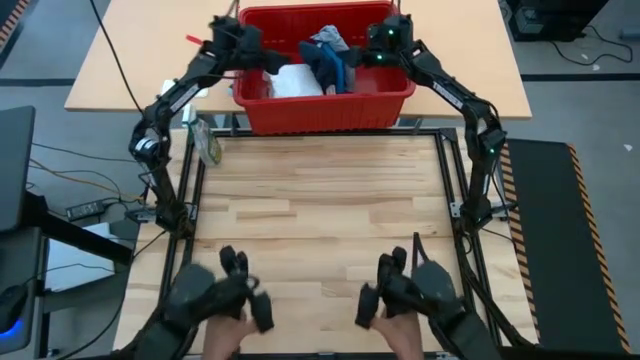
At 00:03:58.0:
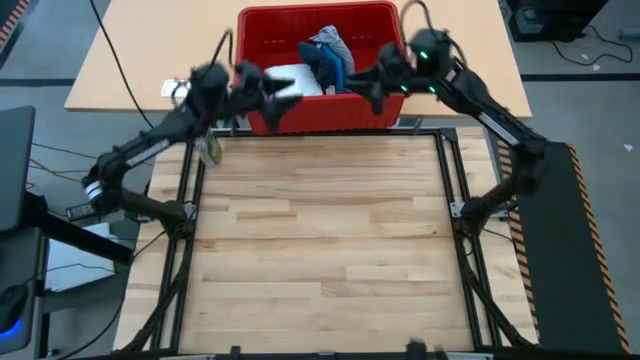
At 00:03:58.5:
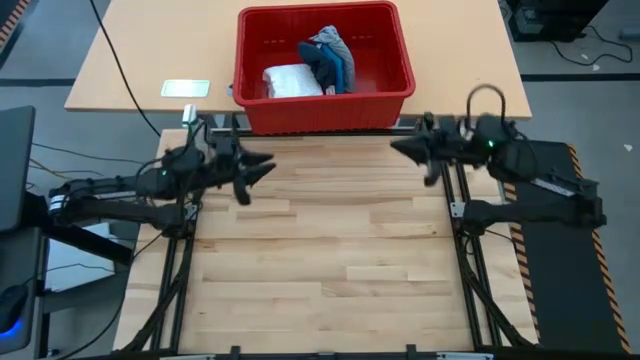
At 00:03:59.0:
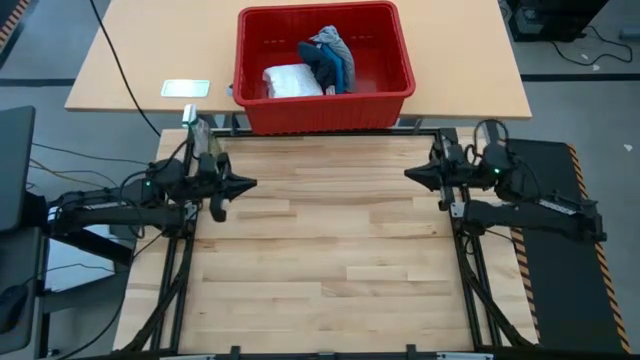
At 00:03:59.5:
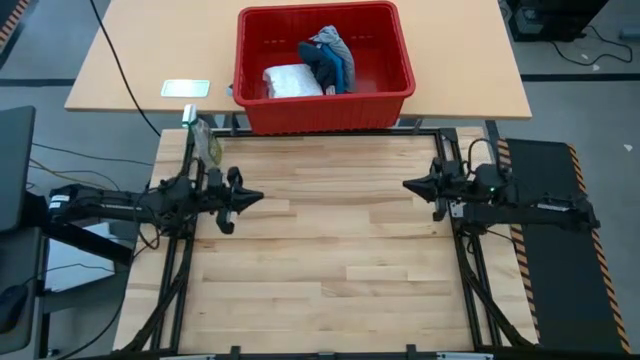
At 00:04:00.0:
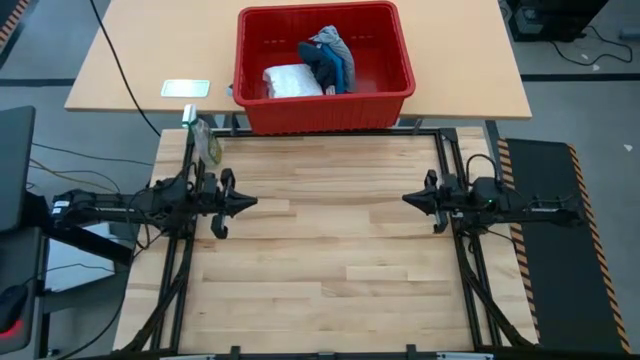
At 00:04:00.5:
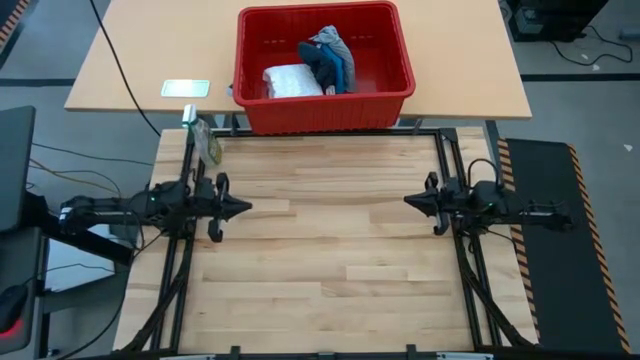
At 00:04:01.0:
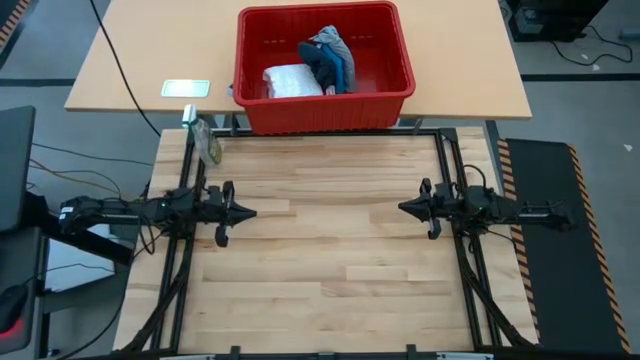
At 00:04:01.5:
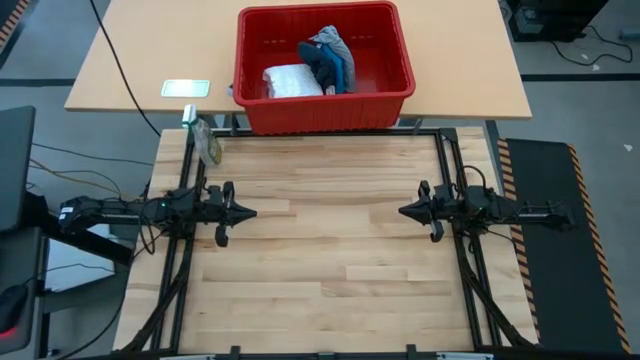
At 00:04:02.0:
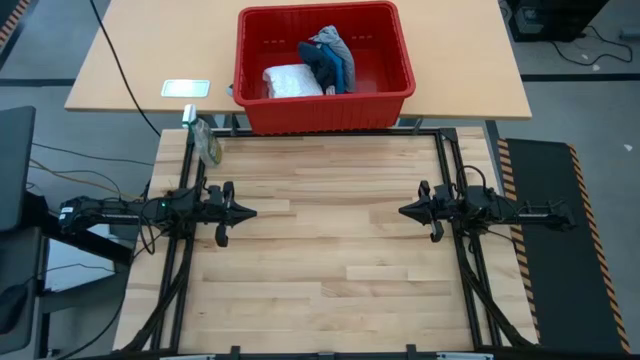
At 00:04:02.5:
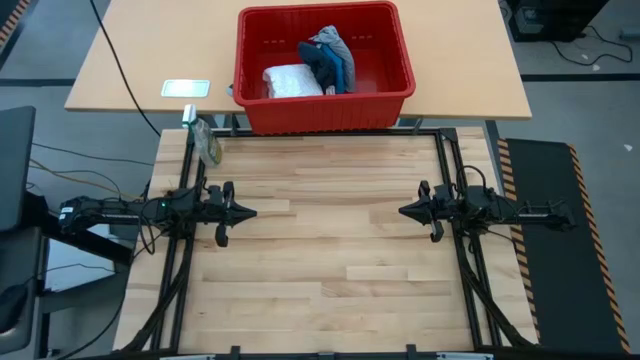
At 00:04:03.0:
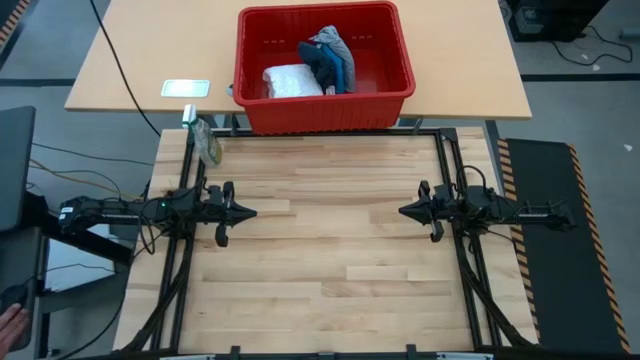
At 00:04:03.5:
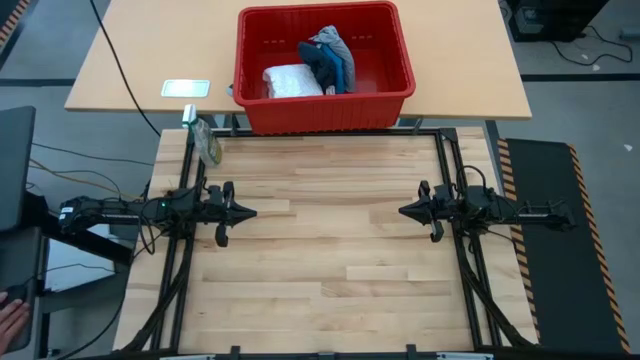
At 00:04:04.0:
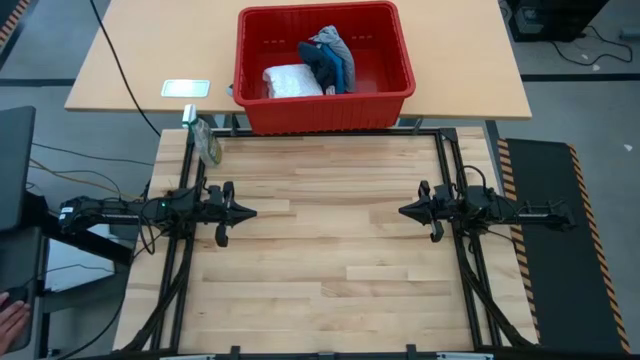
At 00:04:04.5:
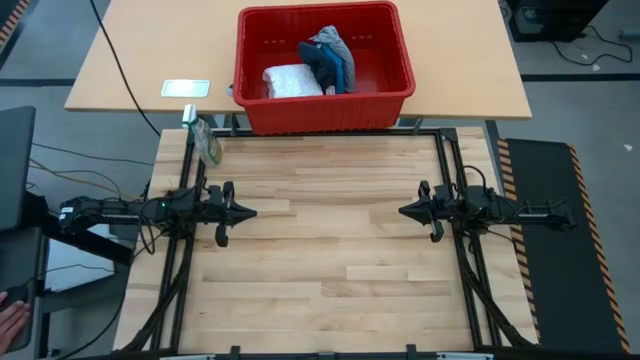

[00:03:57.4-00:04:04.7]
Task: Fold laundry
Return to Home Position

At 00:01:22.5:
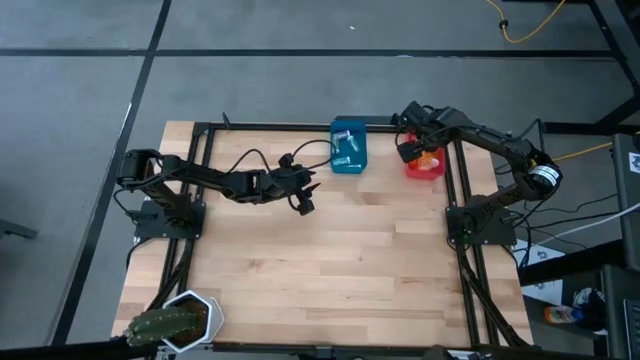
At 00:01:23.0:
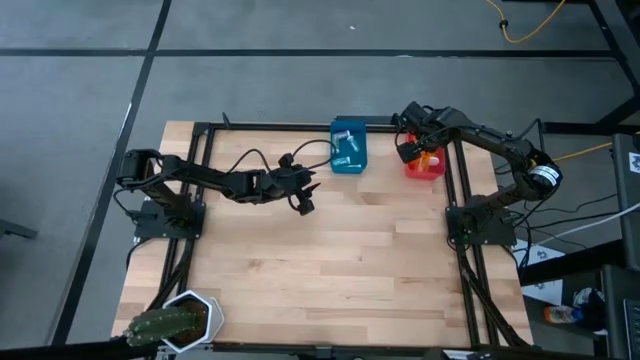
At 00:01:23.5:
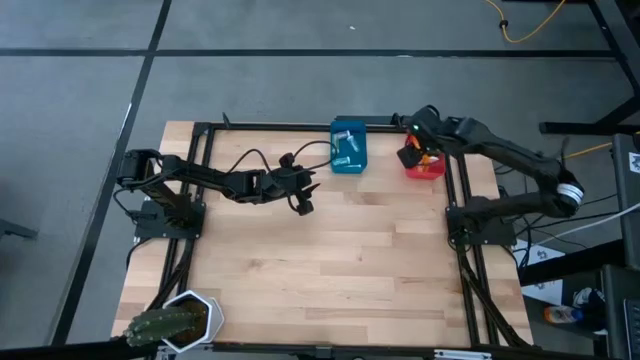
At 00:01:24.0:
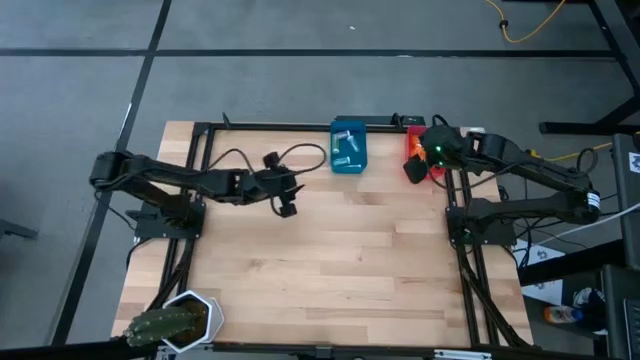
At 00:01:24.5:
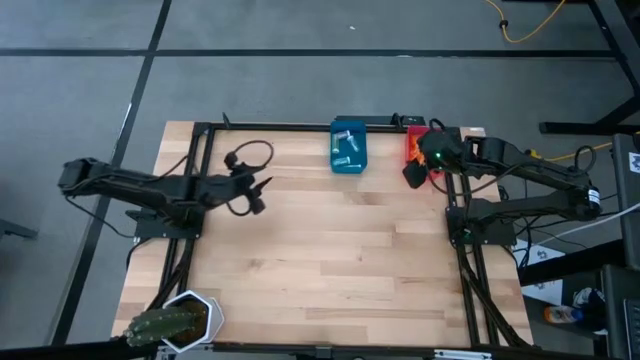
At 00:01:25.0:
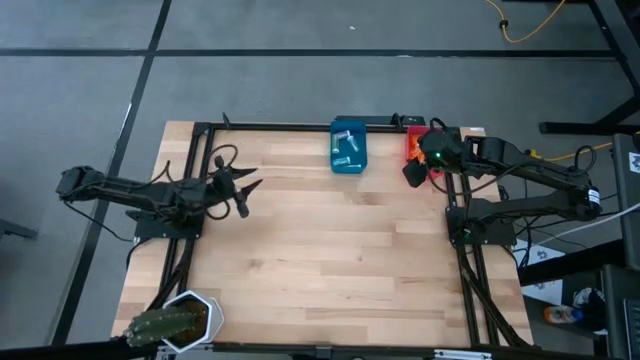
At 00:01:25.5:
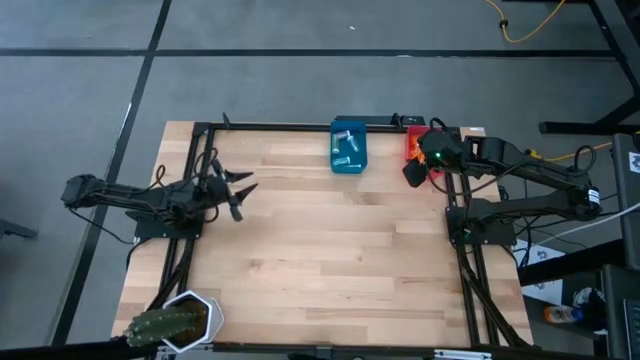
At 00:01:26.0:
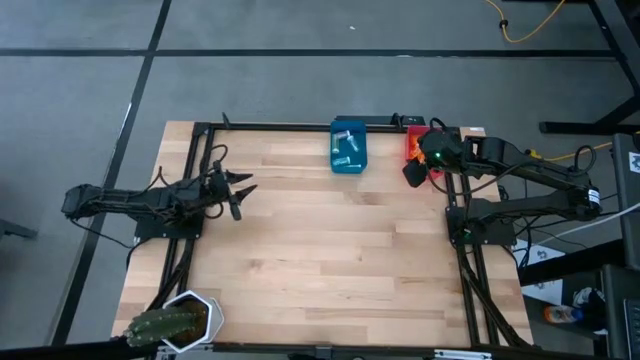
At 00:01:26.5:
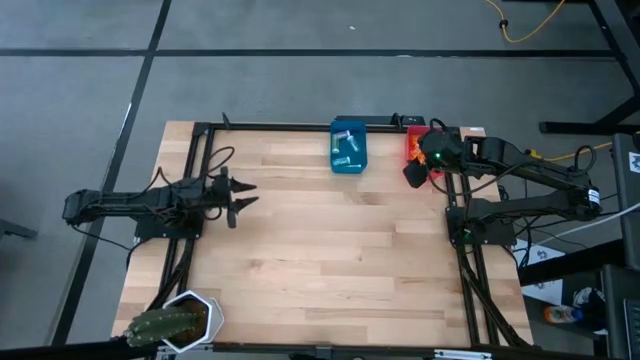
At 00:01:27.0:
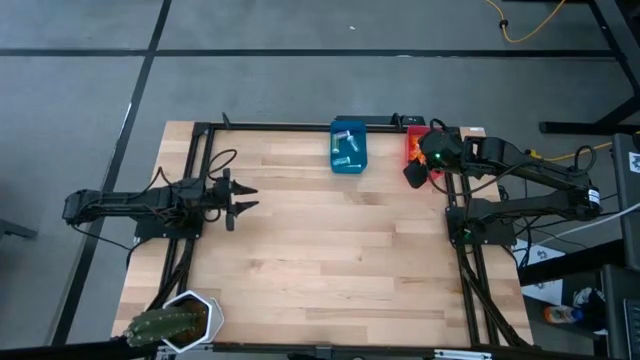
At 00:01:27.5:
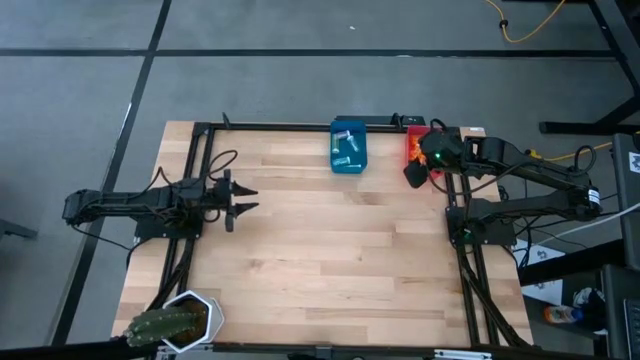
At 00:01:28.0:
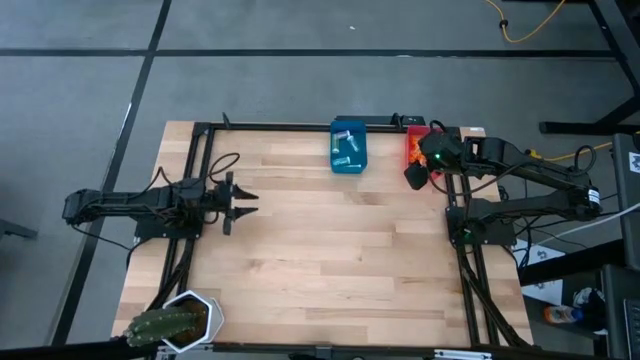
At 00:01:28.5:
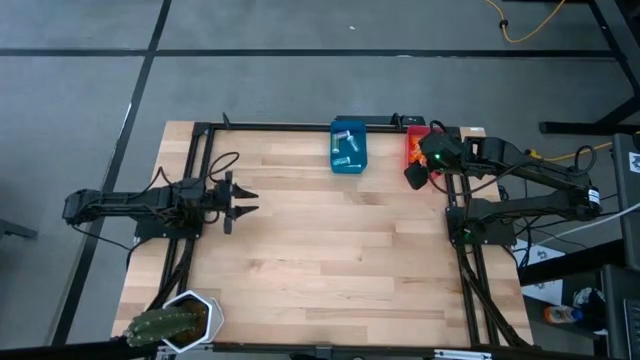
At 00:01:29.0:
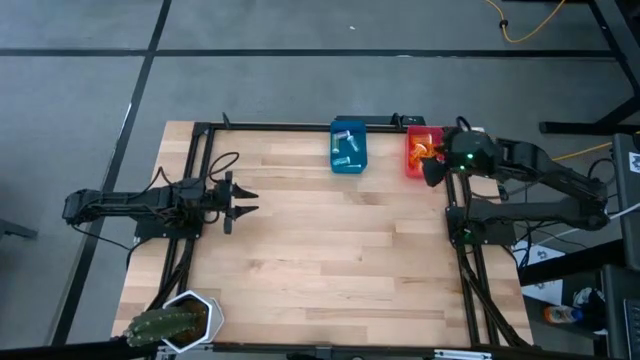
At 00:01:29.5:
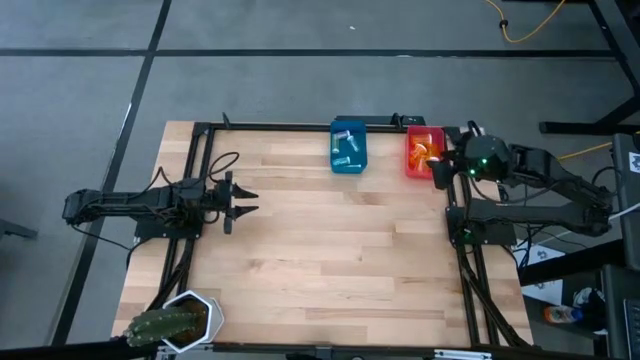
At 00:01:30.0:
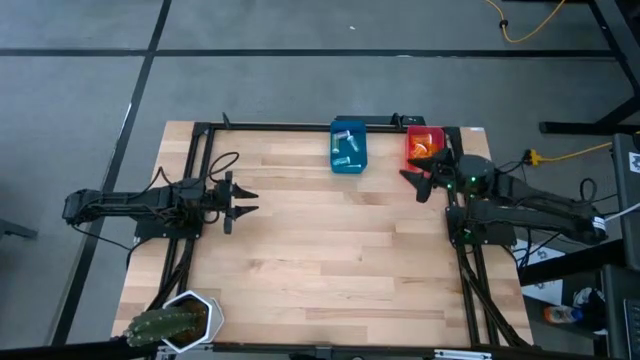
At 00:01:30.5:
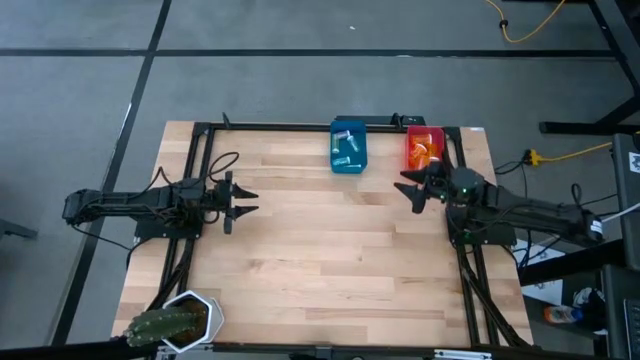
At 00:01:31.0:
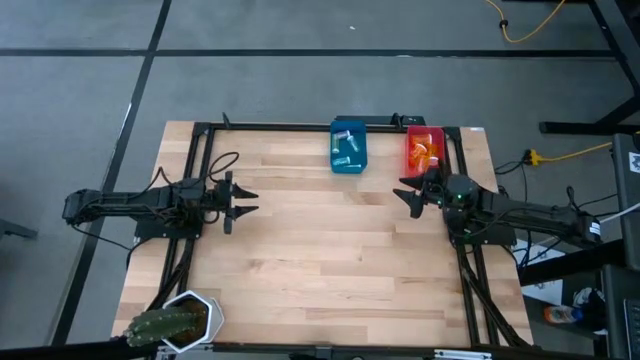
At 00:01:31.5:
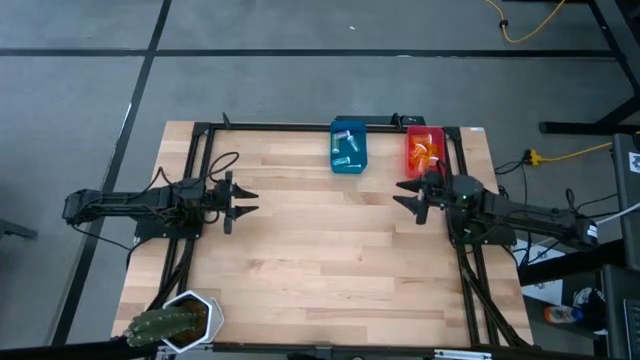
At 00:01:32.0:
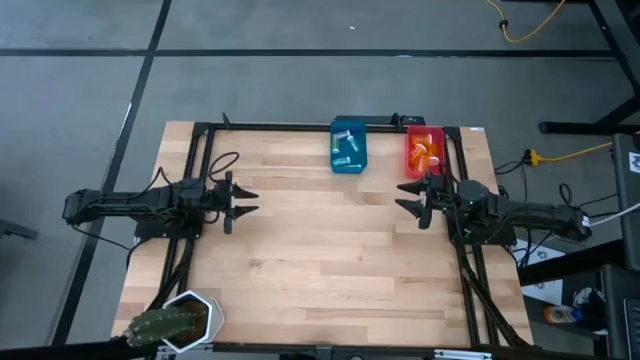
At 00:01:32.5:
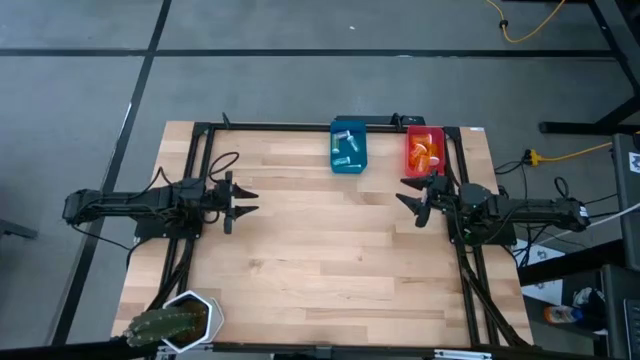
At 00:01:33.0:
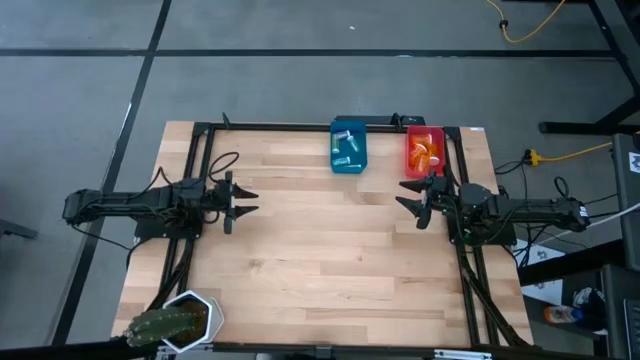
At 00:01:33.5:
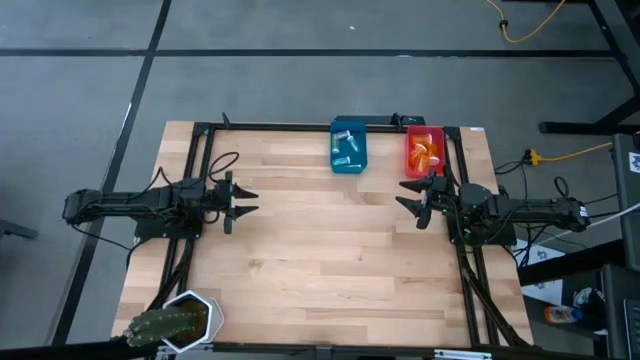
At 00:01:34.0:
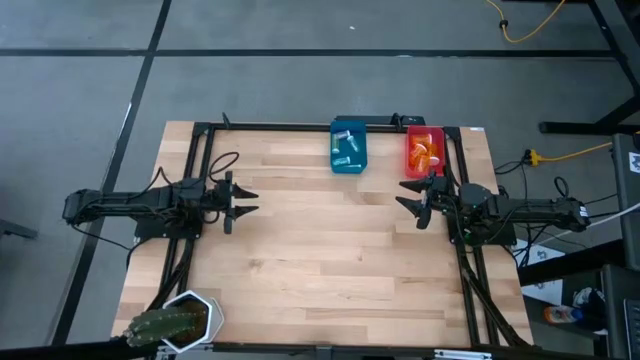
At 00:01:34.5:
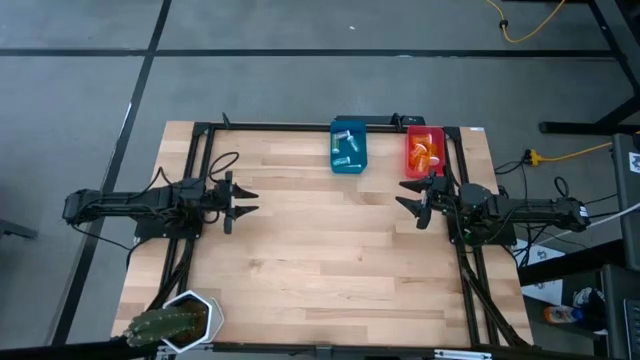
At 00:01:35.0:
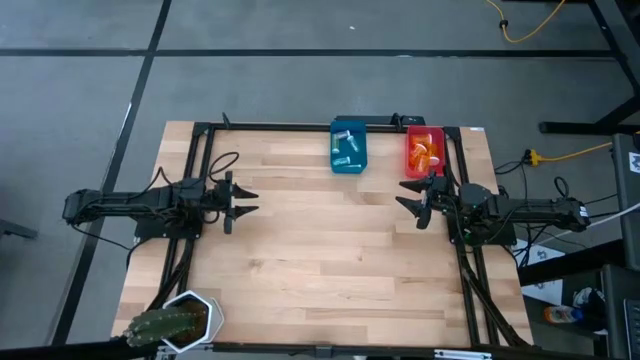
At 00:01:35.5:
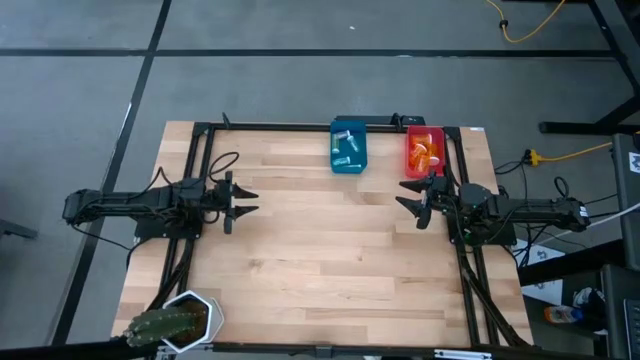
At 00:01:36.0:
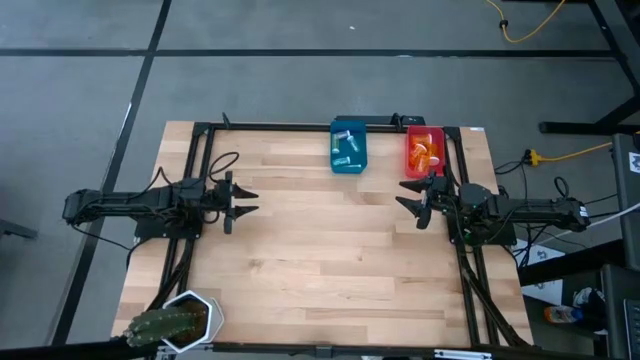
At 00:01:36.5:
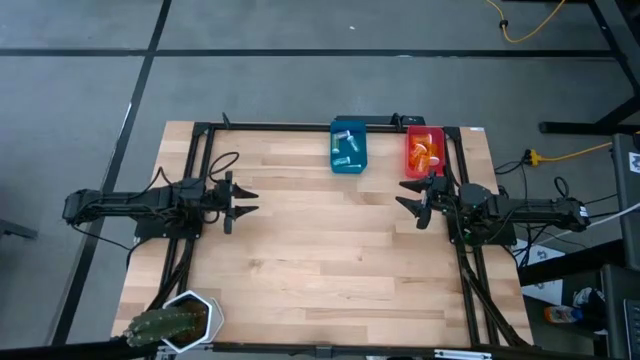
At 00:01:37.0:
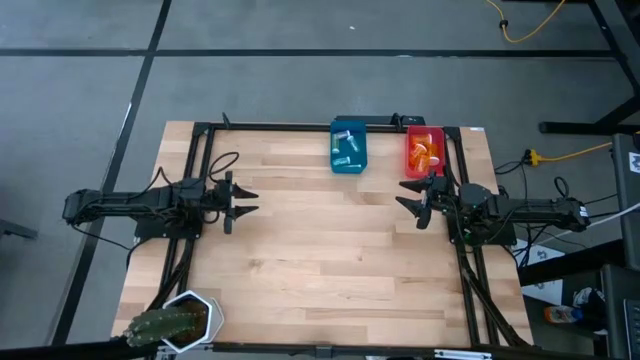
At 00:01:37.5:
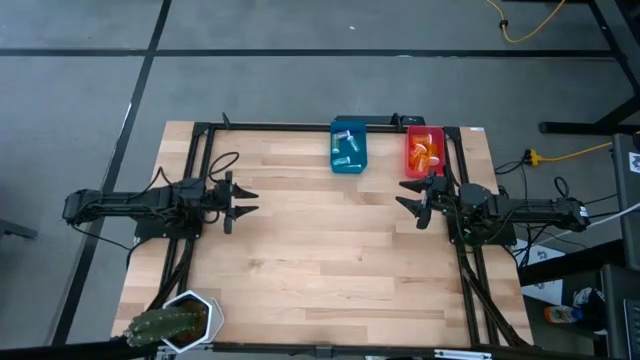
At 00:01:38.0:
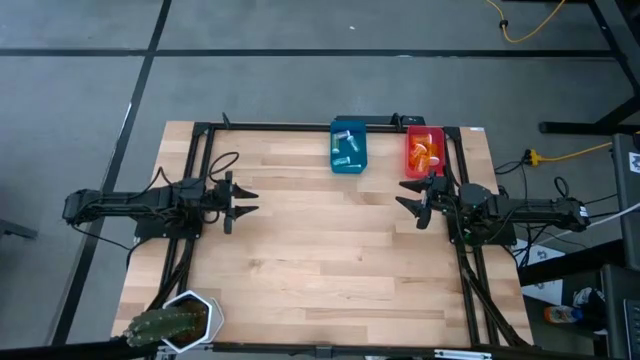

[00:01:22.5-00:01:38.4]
Task: Pick and place medicine bottles into bin by pill shape (circle, oval)
Return to Home Position
